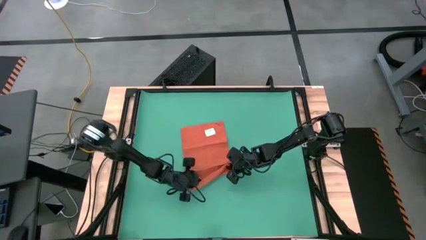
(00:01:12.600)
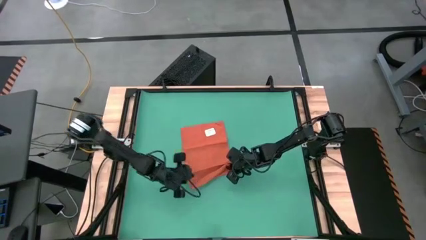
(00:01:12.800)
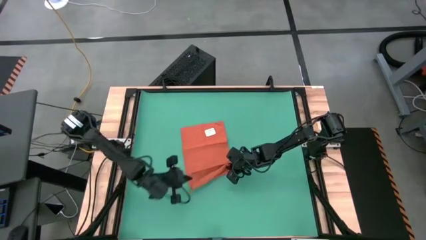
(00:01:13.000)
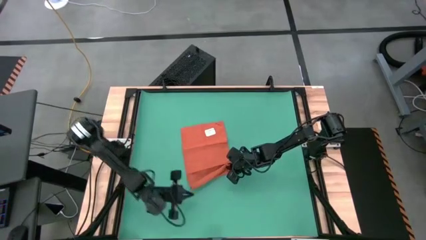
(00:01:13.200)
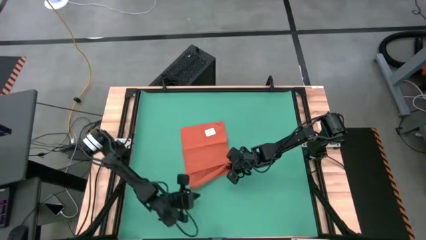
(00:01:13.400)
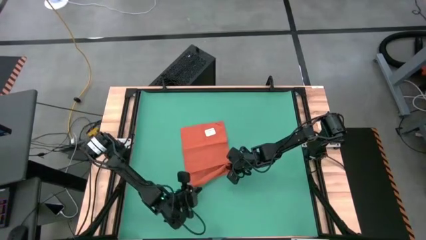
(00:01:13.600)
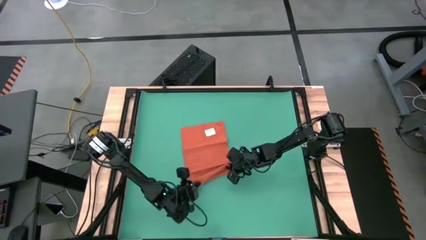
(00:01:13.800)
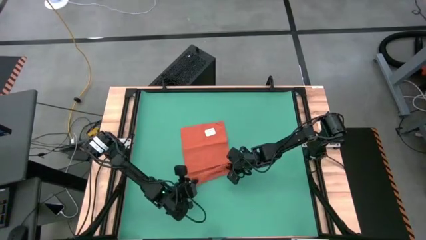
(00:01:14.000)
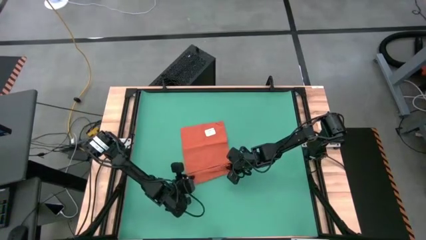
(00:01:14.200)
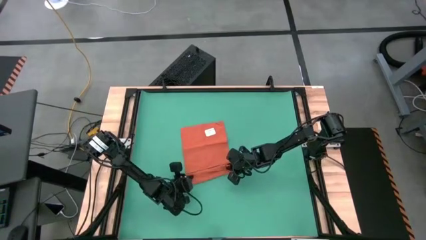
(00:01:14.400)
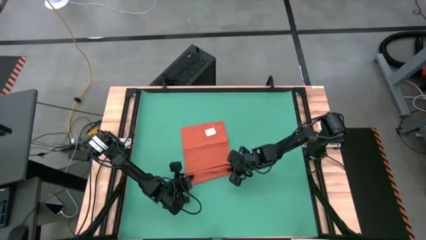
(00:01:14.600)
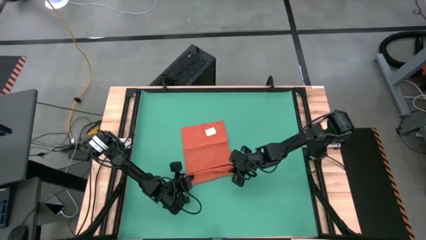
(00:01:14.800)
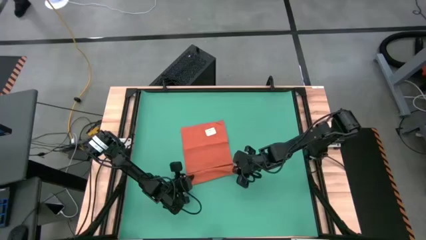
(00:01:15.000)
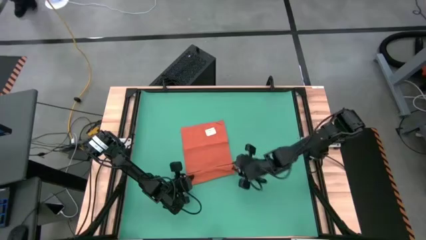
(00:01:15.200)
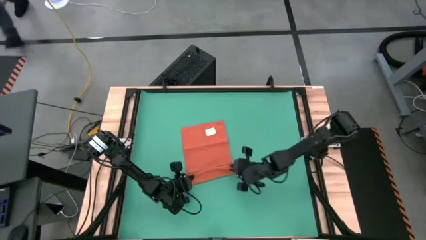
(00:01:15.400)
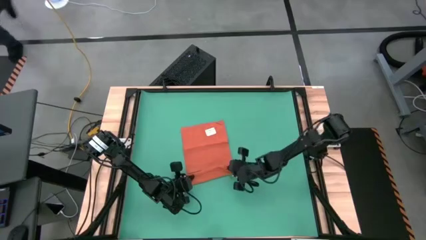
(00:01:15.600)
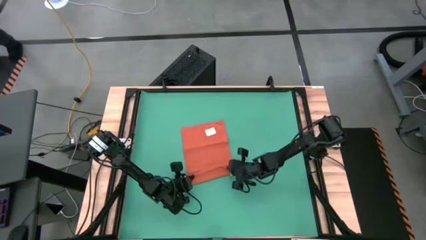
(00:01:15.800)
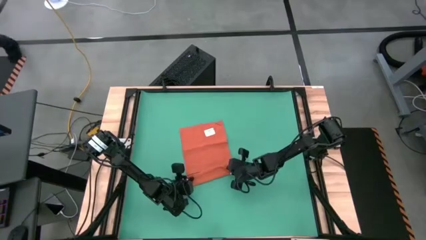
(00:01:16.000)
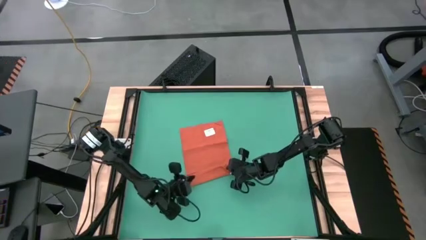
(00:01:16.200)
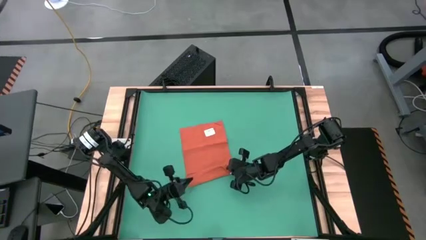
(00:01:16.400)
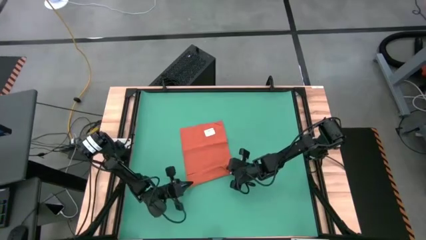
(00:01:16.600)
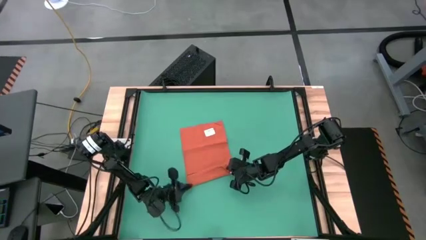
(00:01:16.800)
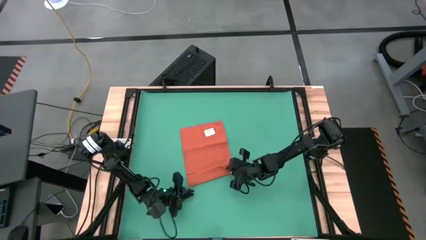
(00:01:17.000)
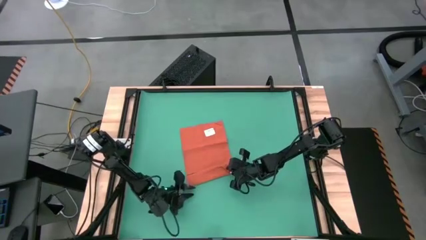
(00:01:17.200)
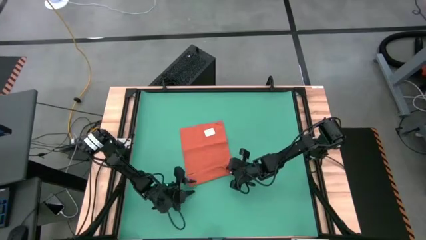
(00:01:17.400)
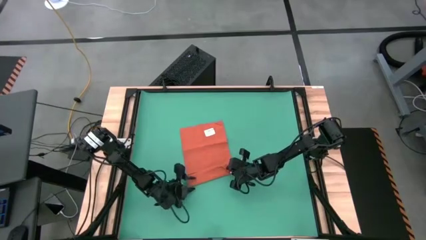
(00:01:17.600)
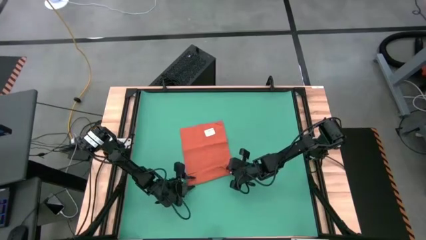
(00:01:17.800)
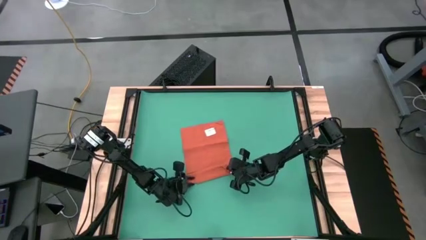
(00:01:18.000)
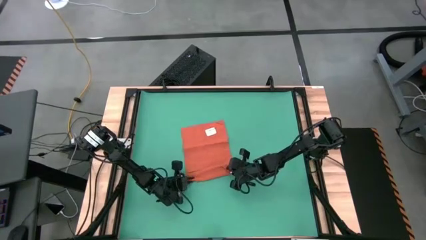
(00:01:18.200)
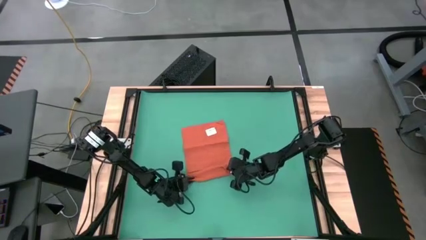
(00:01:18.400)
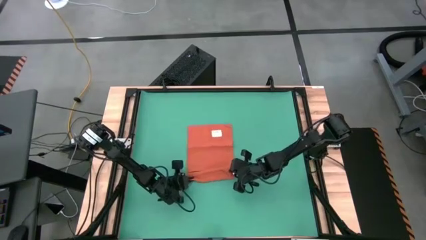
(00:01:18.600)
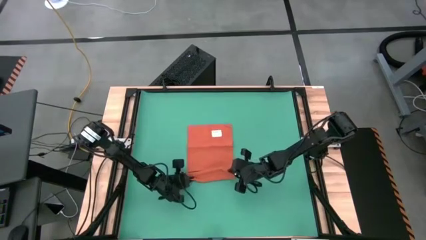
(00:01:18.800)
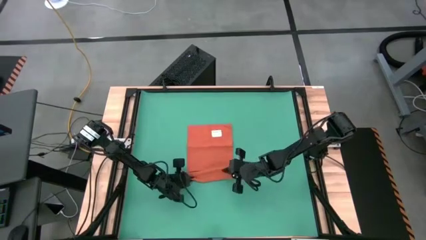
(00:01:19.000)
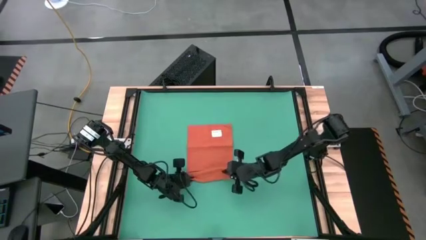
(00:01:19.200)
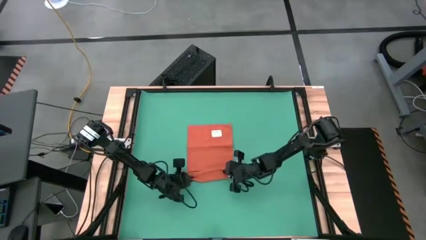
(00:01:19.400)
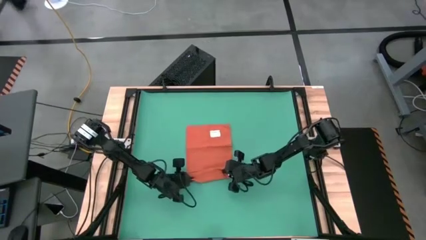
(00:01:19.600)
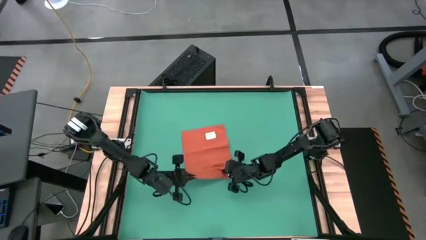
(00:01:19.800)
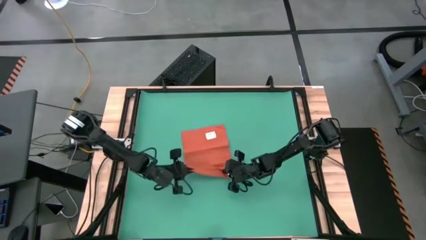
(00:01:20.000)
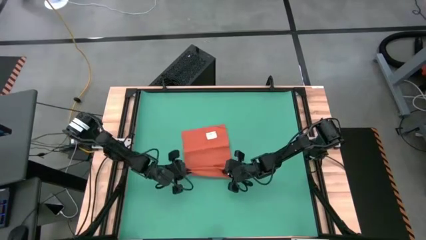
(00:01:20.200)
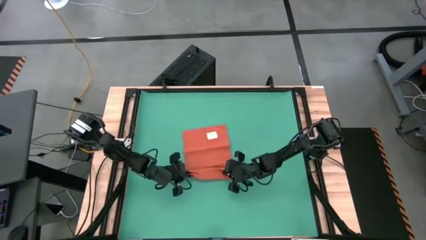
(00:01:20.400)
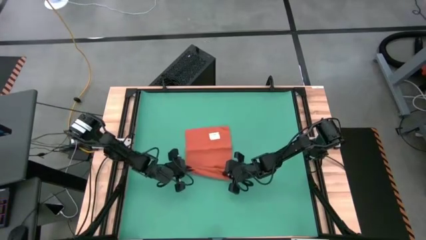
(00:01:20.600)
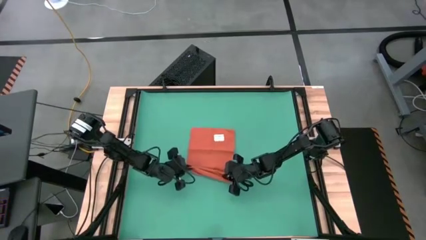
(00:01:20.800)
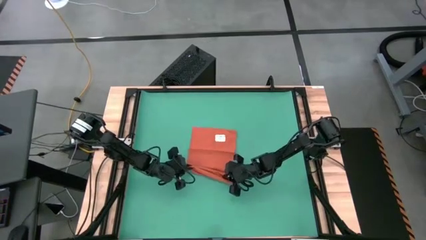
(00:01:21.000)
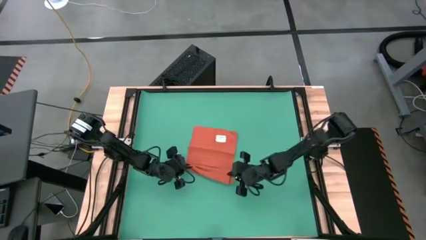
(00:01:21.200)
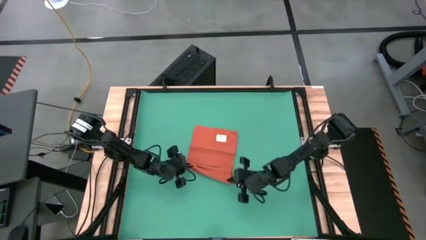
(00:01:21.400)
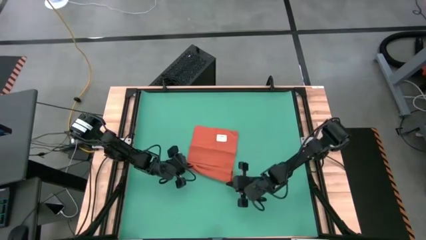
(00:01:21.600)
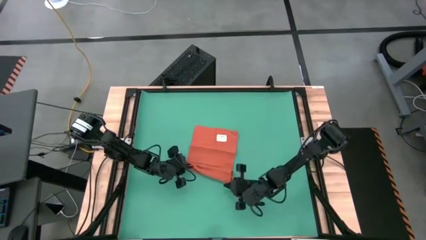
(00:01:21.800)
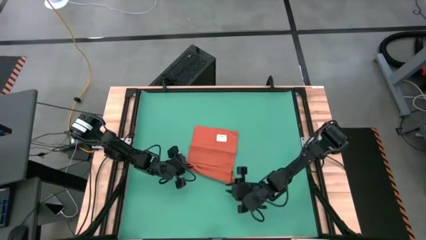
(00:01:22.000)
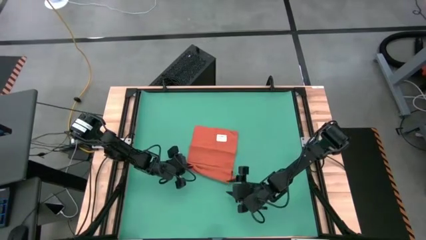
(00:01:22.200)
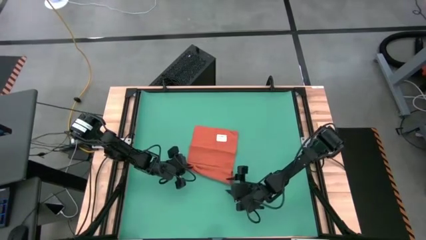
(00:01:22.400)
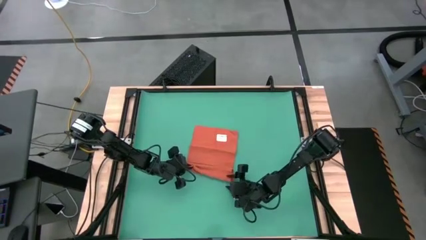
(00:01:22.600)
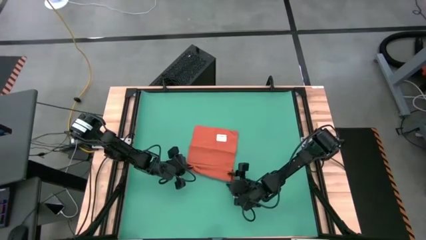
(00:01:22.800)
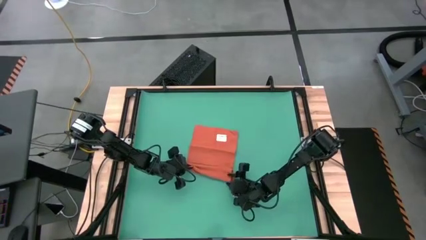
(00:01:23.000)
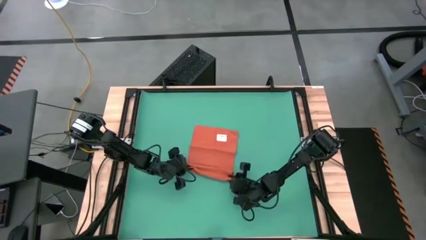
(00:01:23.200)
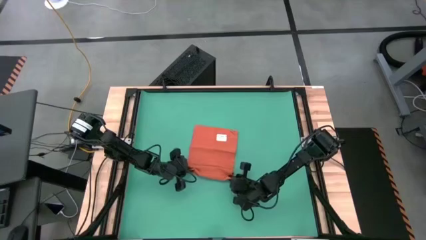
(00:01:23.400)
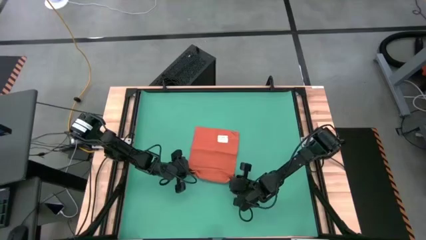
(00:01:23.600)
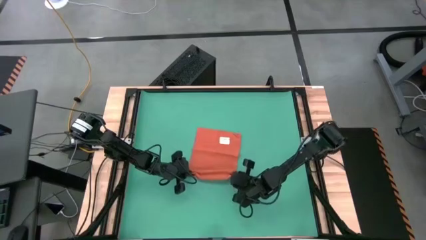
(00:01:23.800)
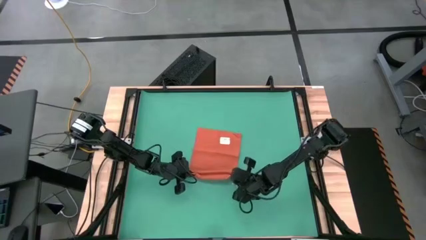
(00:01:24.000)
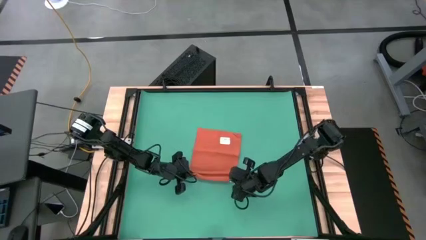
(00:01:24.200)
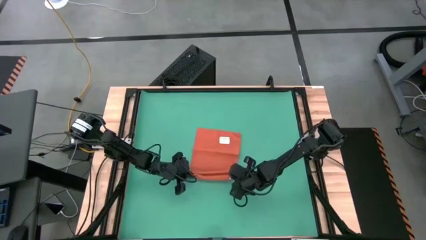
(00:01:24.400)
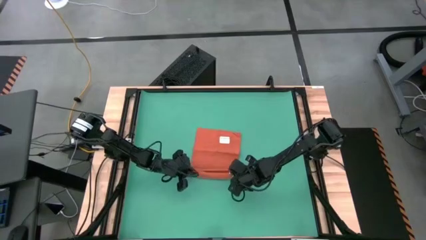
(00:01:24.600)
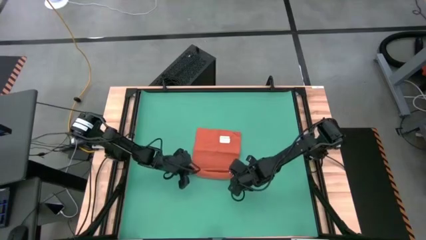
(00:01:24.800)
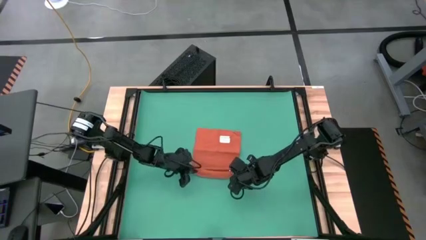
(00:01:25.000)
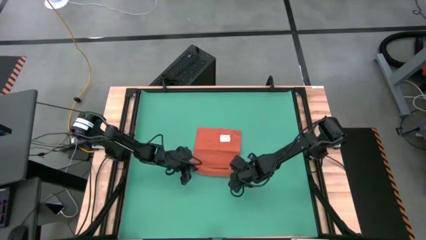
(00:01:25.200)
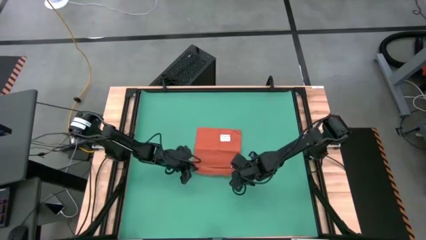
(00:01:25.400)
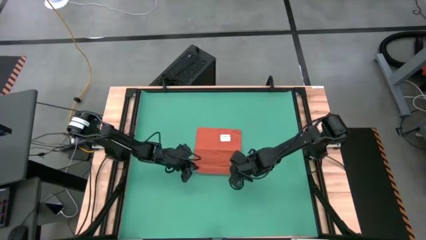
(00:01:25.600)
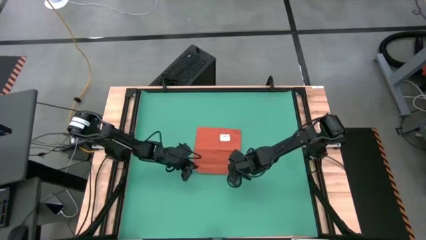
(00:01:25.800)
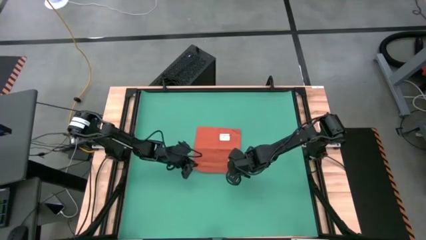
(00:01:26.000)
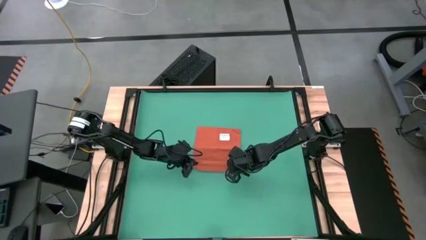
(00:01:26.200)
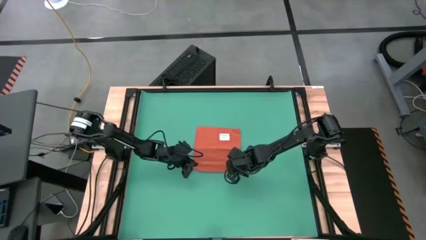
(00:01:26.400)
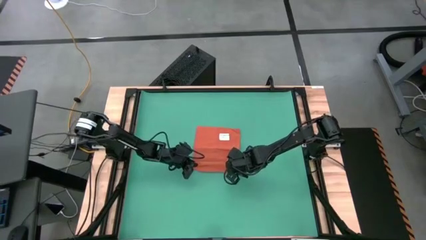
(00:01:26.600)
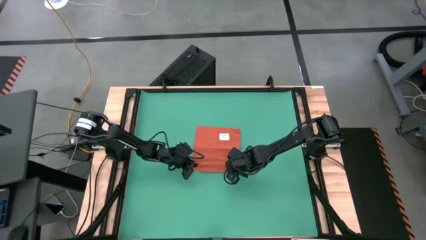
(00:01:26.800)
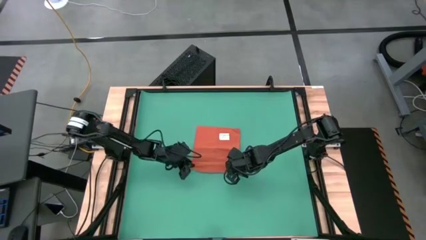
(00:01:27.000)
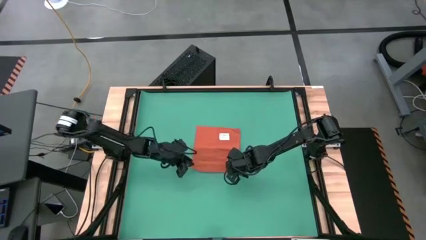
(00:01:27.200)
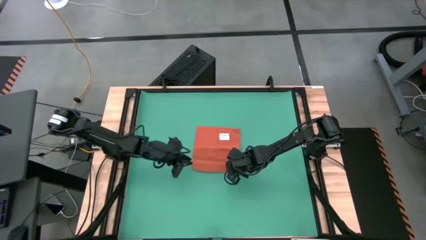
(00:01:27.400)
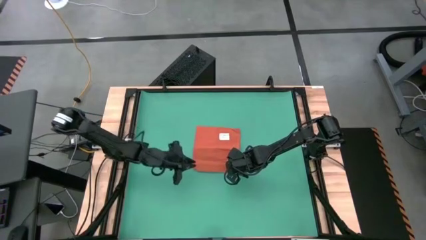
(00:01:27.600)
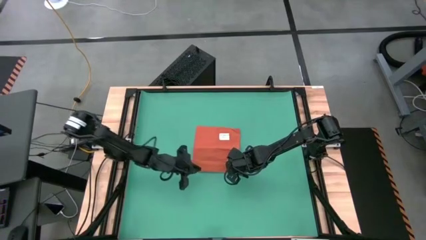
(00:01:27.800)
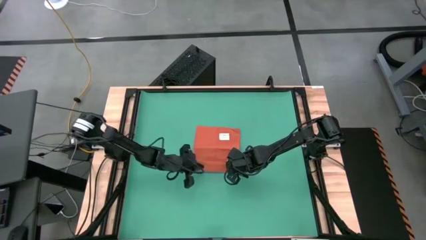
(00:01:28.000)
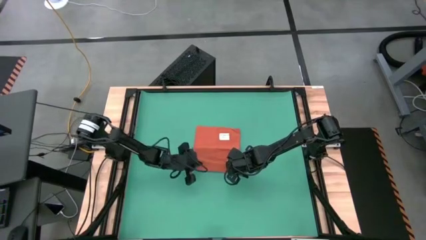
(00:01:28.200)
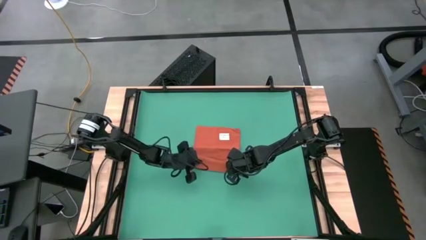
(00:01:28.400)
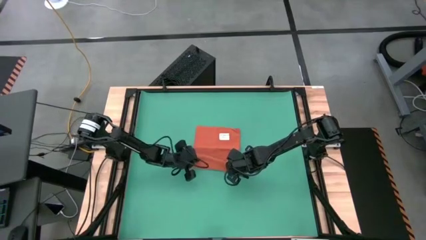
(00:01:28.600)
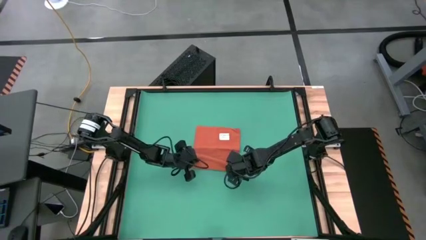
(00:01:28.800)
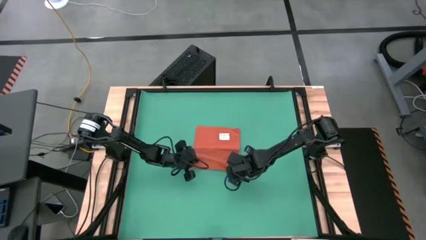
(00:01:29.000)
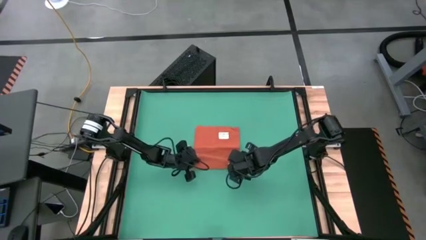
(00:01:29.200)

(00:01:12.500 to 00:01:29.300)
Task: Roll towel
Roll the orange towel
